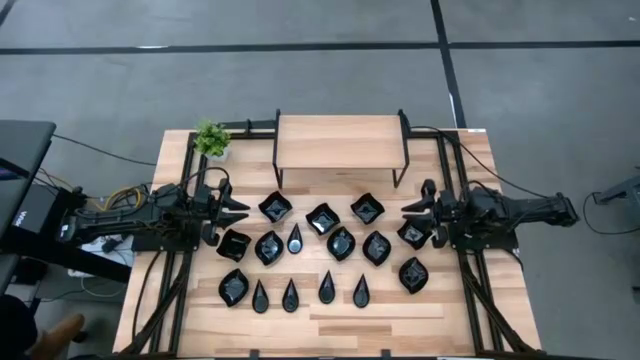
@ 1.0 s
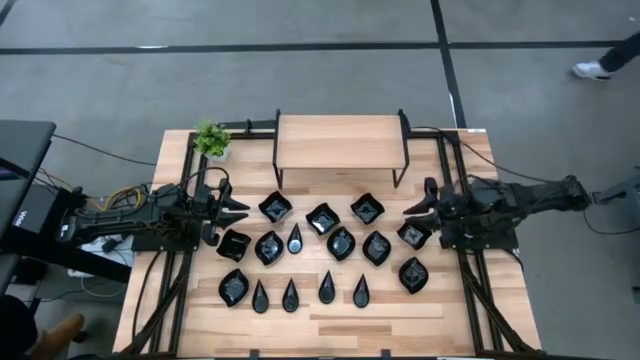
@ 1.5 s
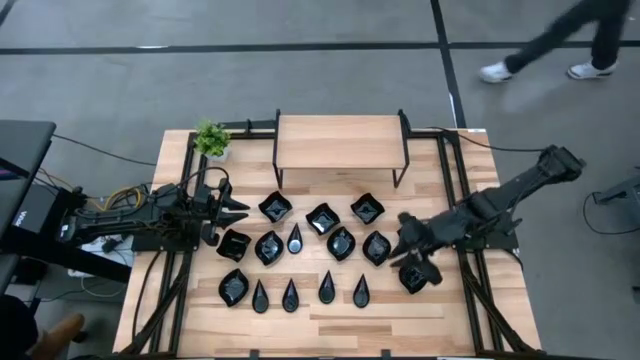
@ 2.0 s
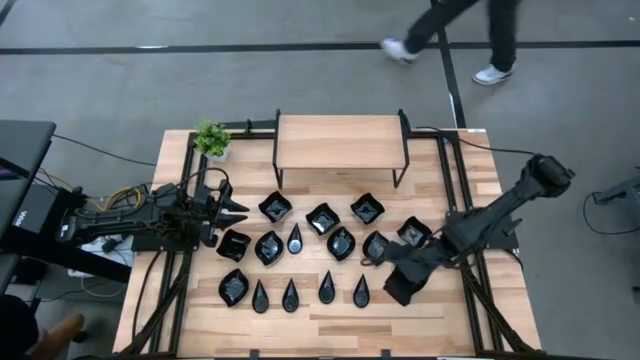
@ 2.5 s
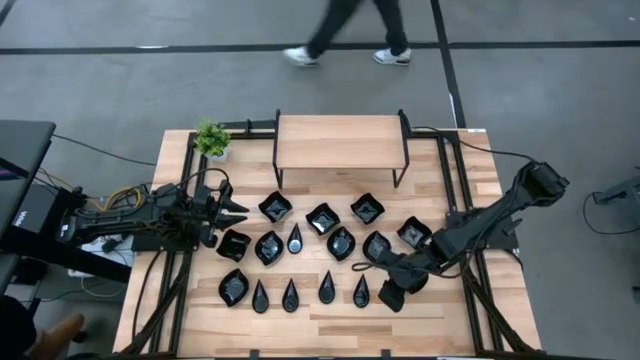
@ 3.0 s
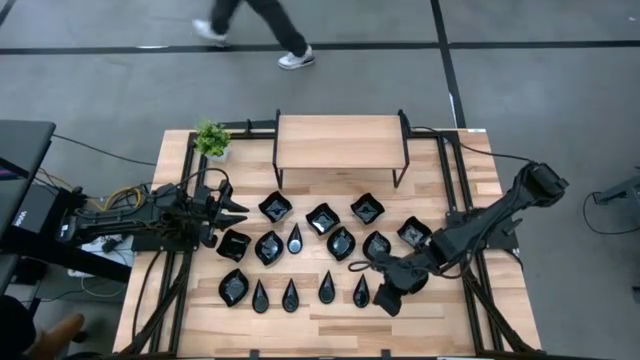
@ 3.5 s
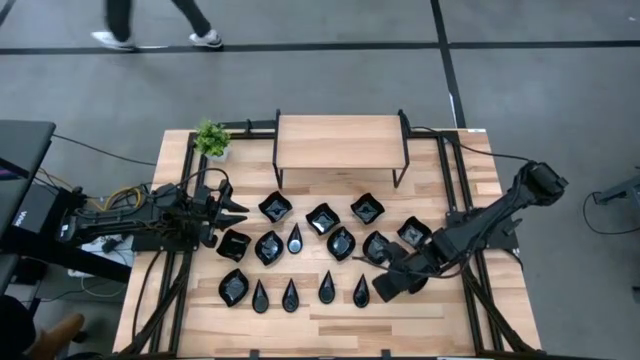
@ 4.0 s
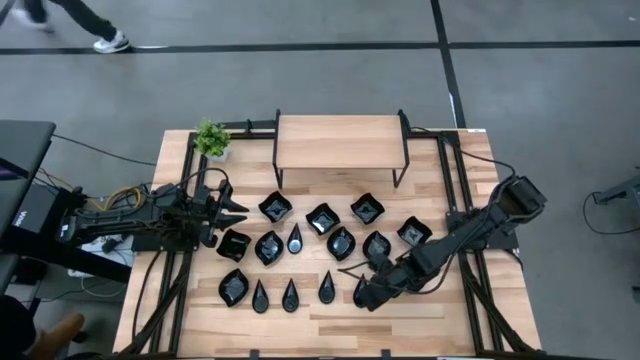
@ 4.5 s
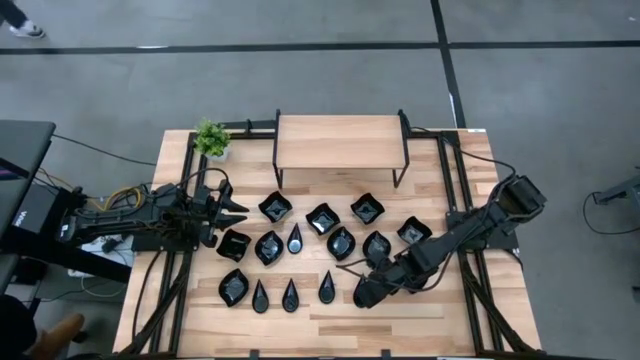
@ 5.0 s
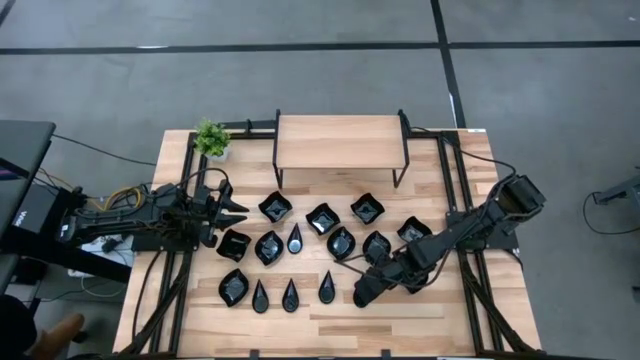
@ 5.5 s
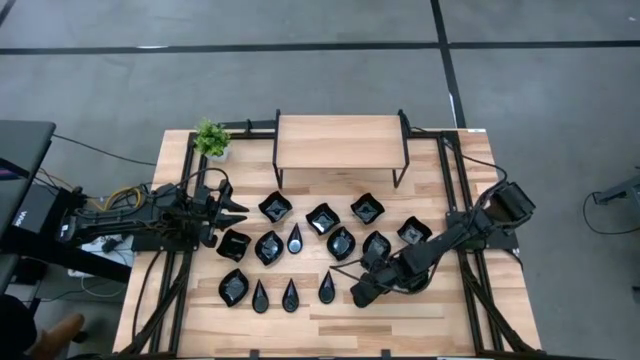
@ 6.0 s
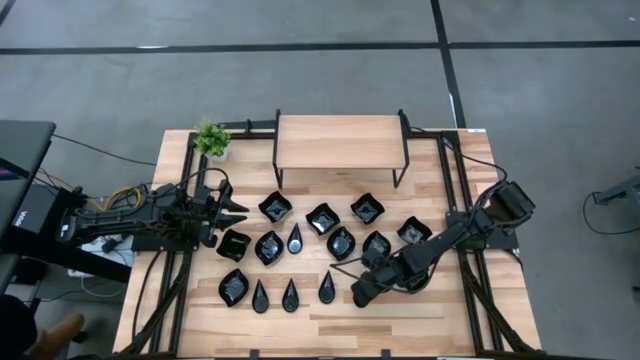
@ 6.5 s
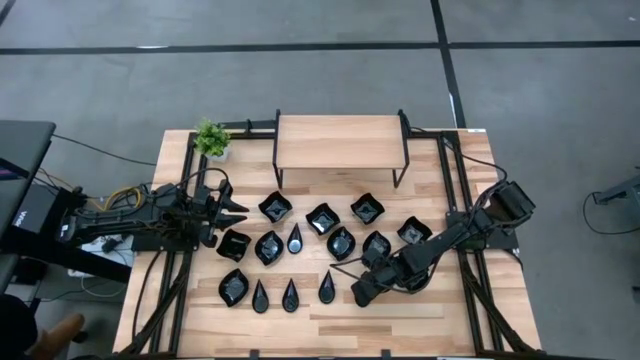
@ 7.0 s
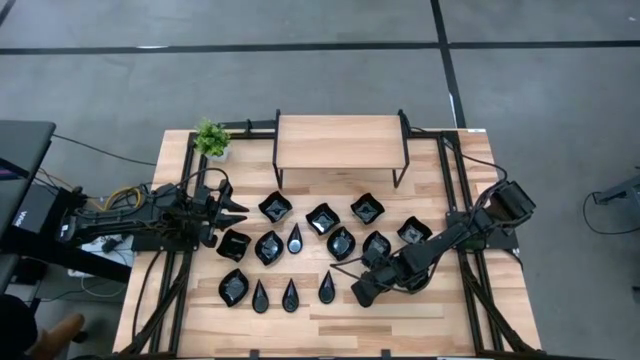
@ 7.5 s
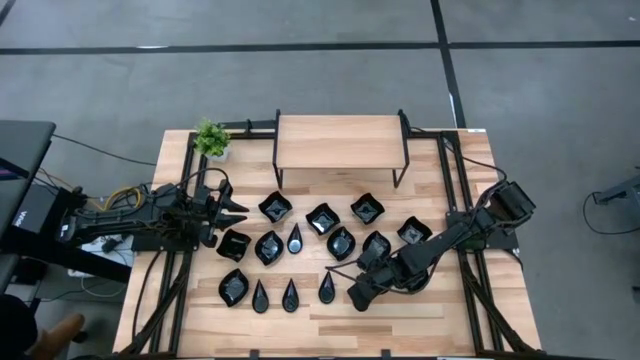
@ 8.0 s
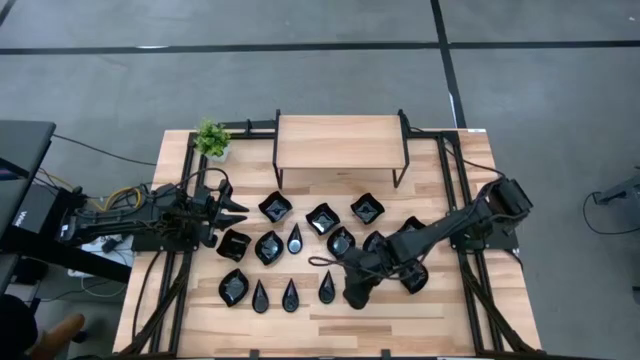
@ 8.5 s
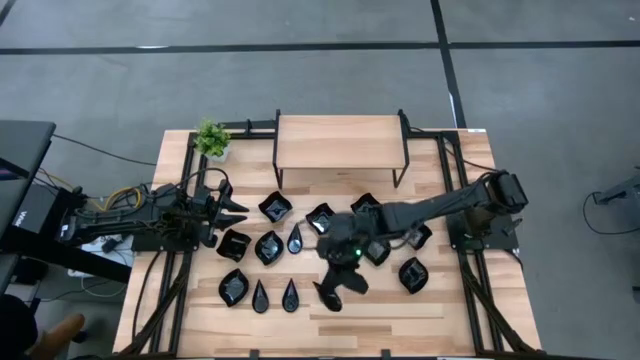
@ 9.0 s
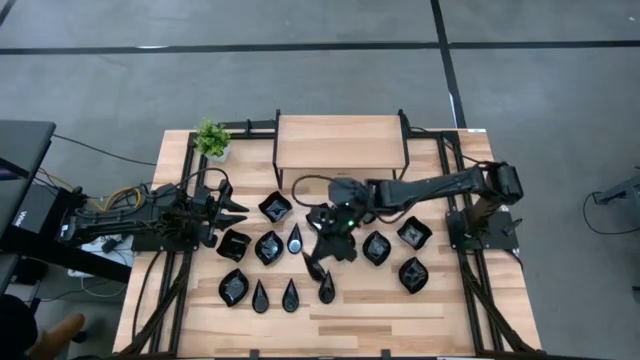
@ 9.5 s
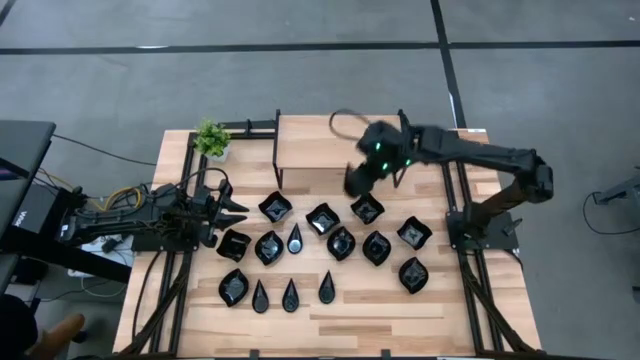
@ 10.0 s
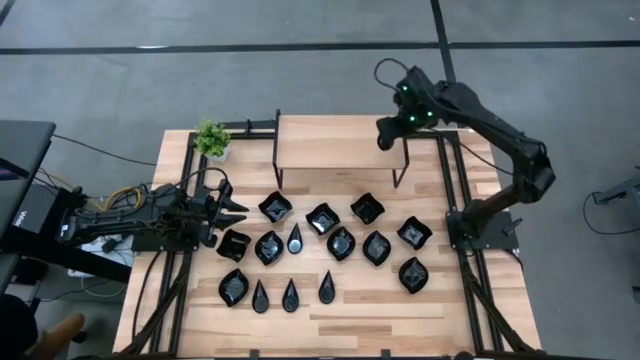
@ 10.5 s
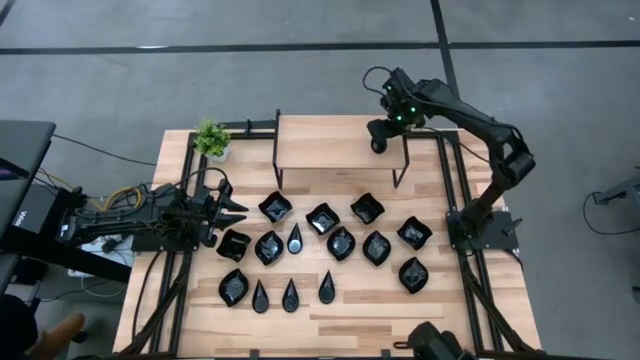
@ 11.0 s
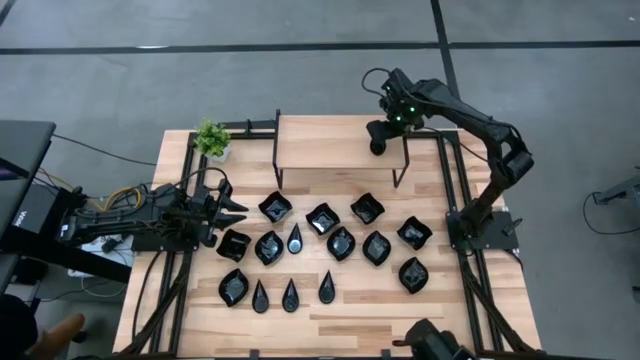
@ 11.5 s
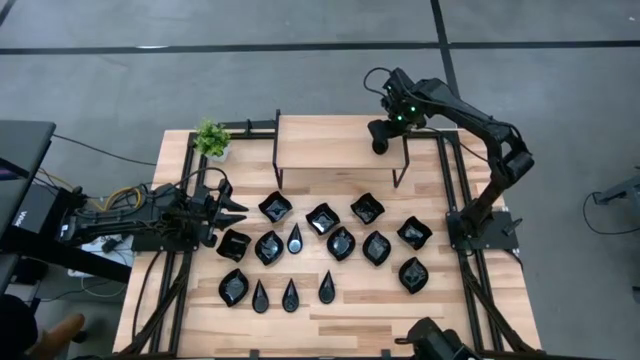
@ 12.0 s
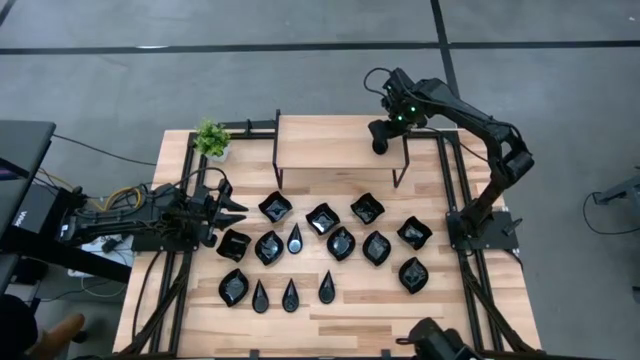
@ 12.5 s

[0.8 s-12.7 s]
Task: Pick & Place Mini shaped plates
Put the black plate on the shelf
